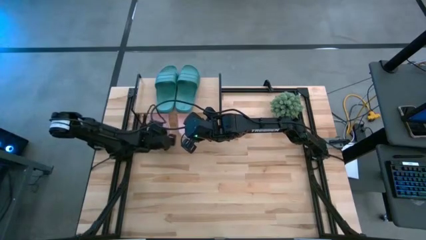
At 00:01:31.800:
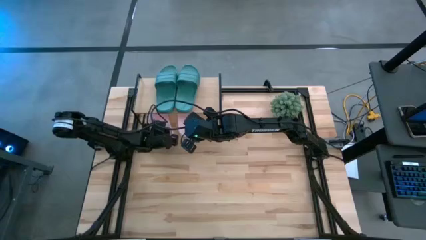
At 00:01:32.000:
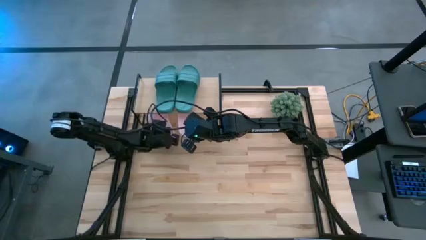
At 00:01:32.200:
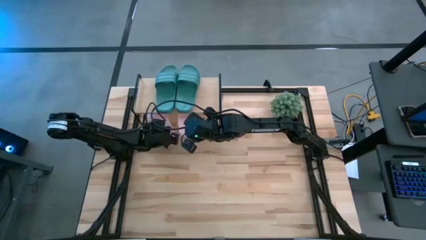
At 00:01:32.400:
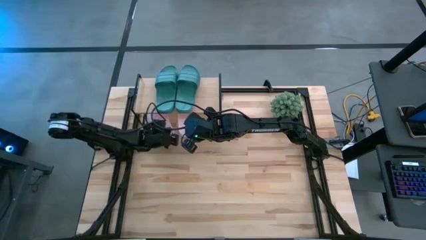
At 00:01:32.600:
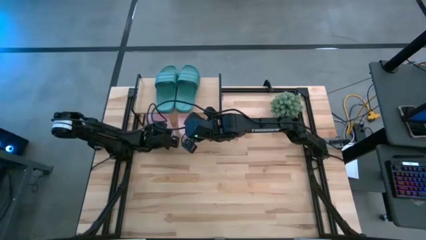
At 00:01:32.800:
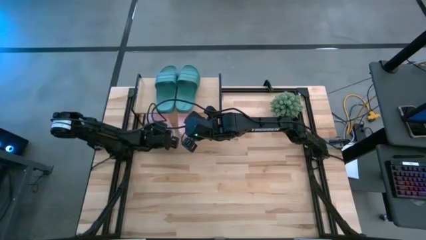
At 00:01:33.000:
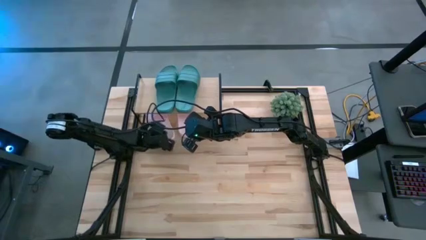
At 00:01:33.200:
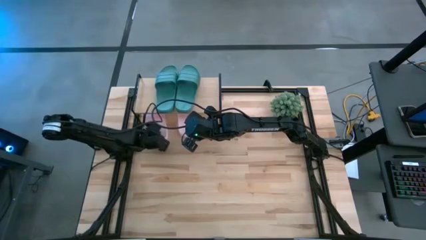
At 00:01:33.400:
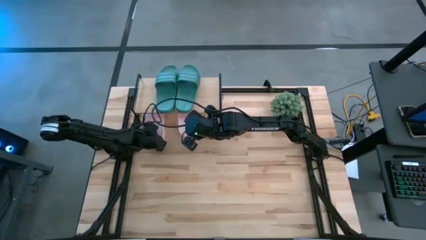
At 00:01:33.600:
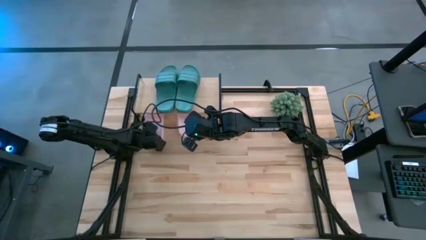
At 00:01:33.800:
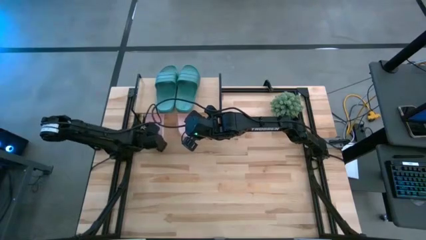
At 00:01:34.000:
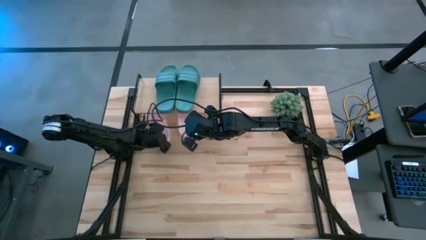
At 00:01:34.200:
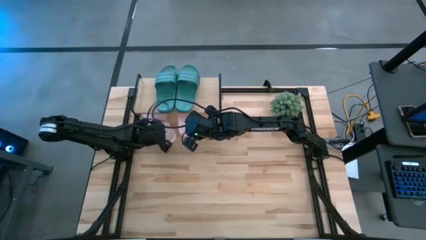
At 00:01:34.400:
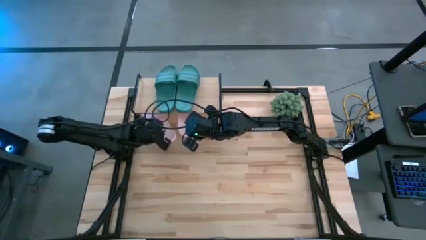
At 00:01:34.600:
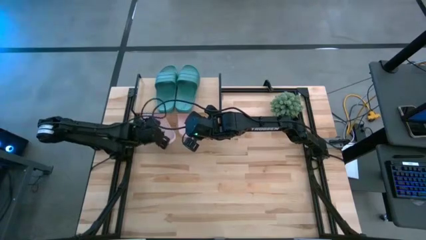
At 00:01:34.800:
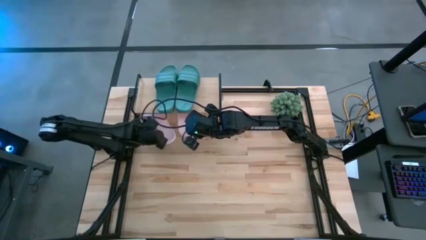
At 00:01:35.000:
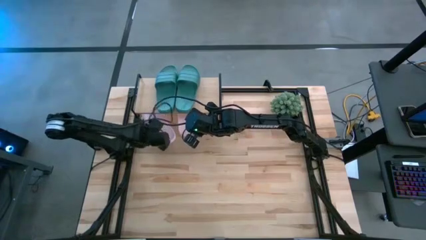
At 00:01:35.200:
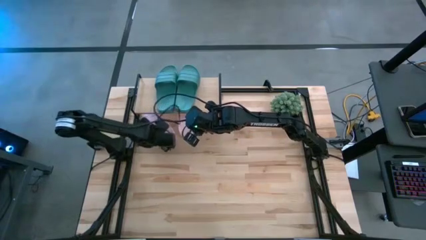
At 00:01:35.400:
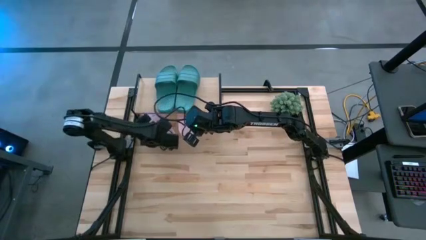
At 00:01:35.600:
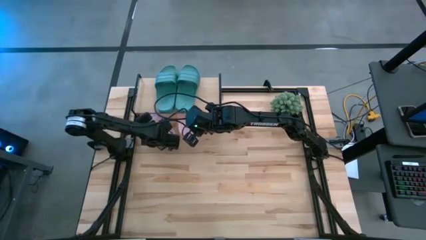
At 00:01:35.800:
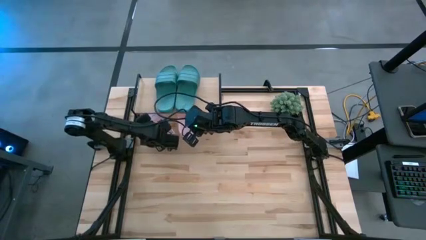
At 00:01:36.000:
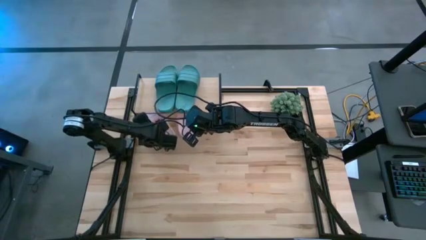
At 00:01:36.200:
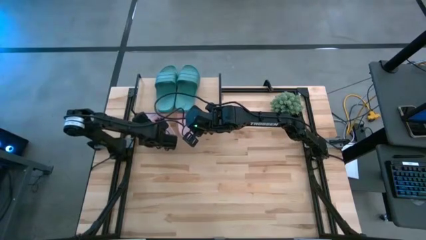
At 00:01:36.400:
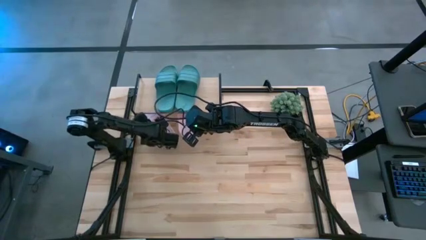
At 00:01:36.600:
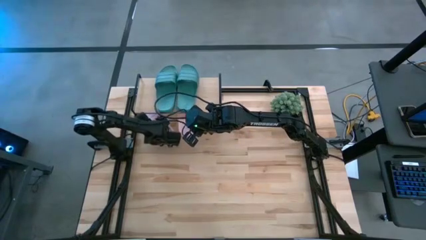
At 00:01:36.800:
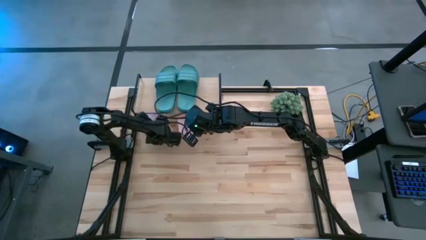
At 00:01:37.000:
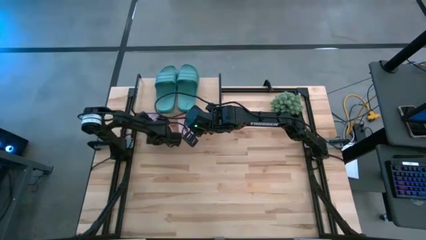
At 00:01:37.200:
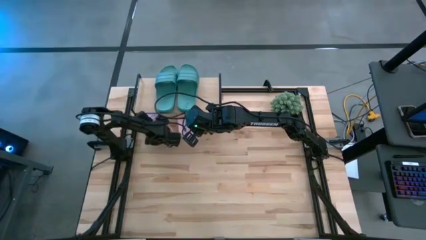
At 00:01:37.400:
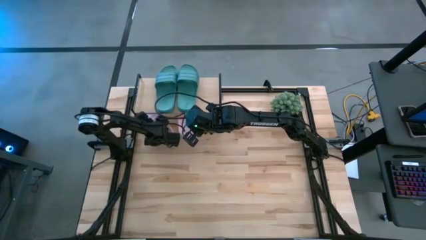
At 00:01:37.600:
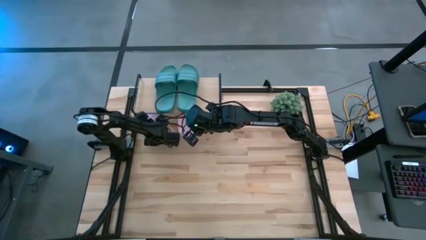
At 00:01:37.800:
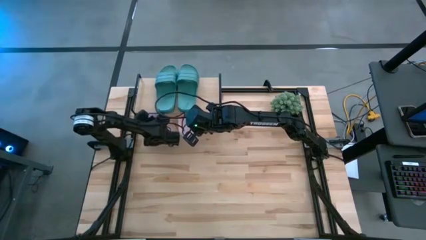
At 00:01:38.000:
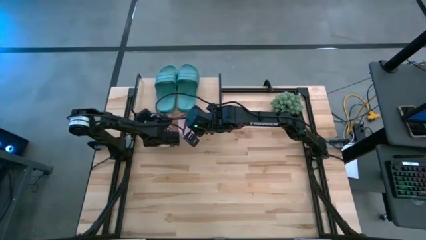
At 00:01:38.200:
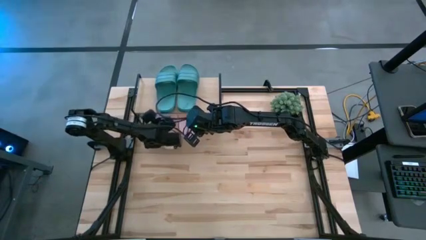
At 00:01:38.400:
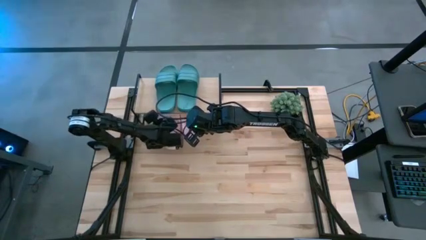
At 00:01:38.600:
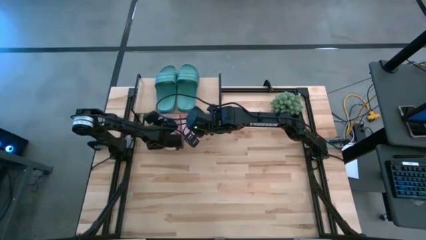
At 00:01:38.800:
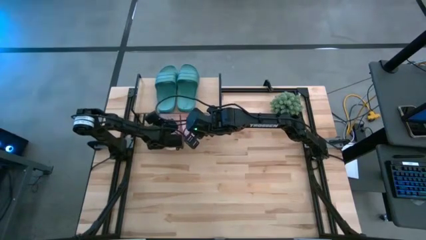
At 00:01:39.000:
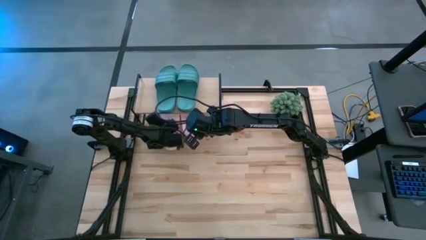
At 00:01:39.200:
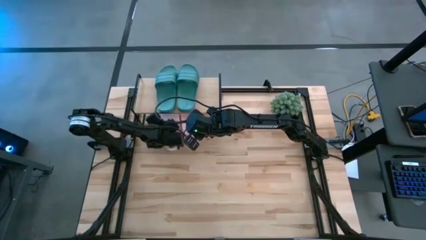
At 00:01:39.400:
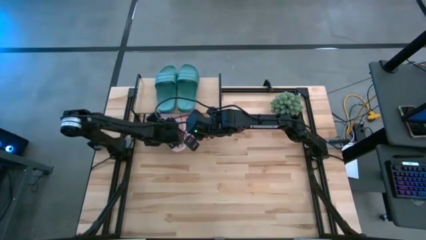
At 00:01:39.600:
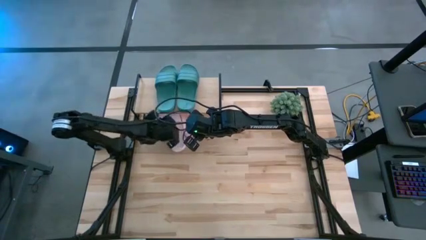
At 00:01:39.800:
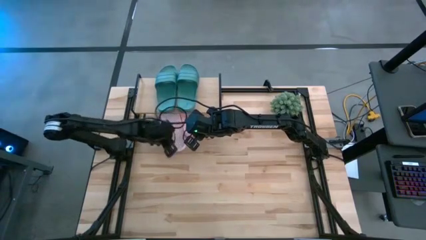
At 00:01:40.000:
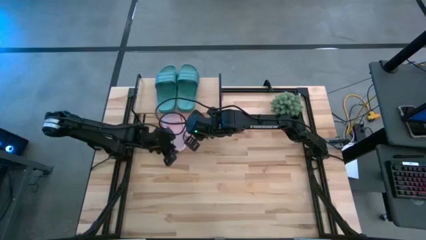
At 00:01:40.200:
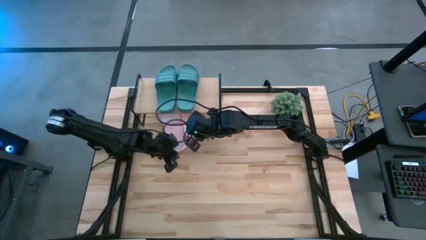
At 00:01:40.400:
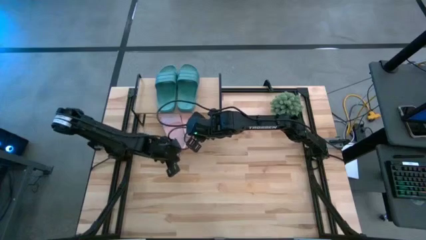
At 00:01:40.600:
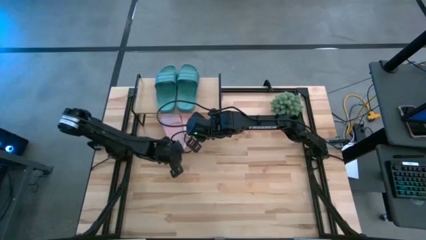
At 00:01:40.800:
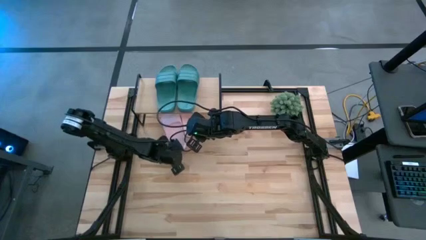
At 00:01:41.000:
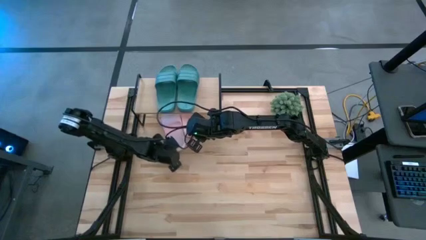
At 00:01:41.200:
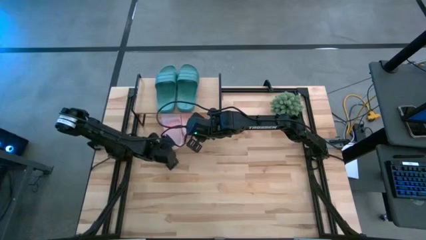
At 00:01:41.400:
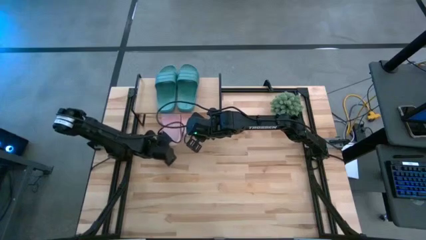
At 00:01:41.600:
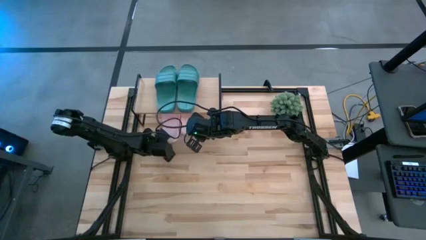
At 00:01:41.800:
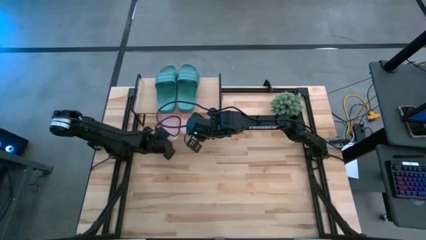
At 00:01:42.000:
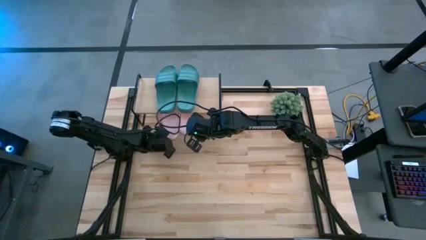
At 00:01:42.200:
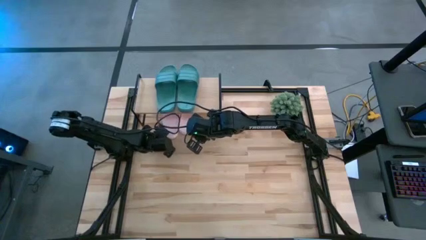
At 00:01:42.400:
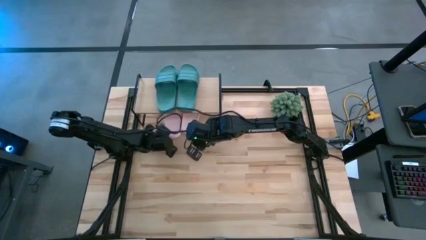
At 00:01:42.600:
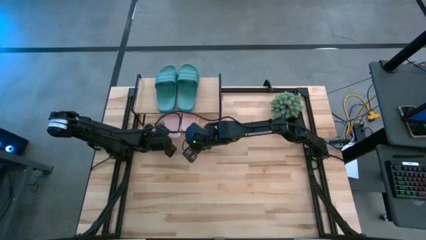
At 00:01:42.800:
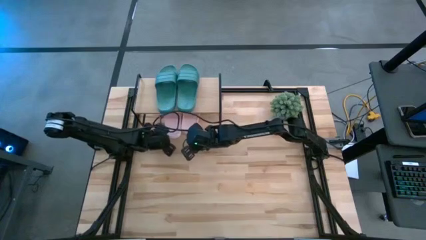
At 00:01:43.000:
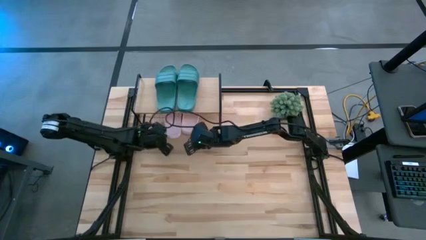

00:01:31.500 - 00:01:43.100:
Task: Pick and place slides into the shelf
Adjust the left pink slide under the shelf

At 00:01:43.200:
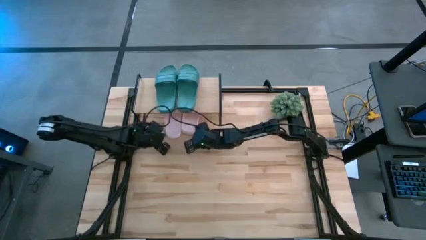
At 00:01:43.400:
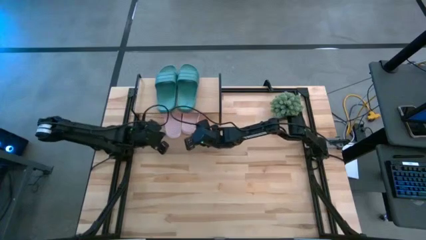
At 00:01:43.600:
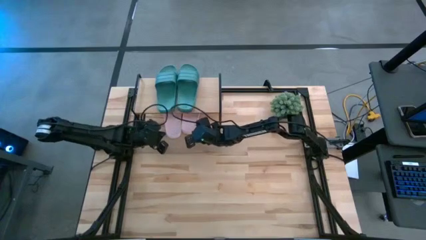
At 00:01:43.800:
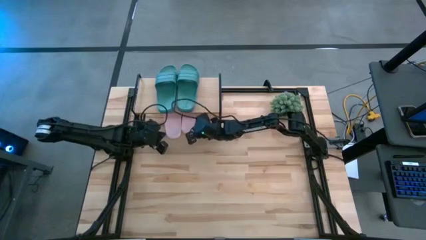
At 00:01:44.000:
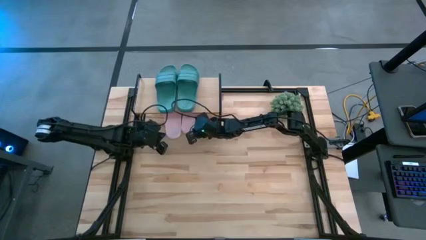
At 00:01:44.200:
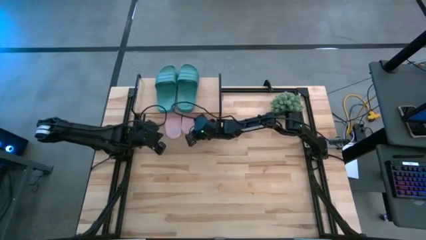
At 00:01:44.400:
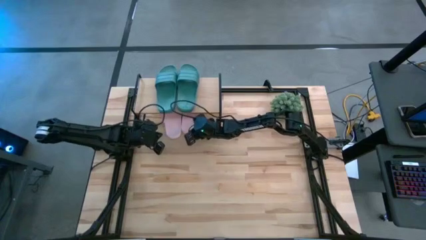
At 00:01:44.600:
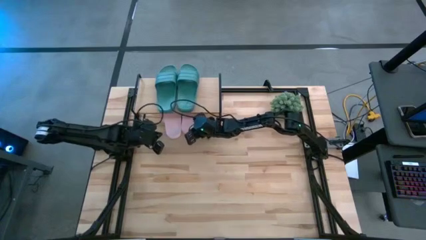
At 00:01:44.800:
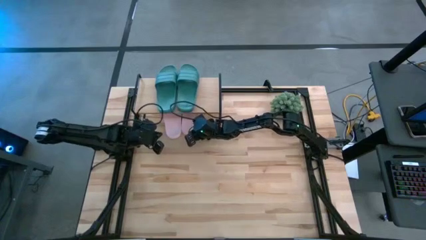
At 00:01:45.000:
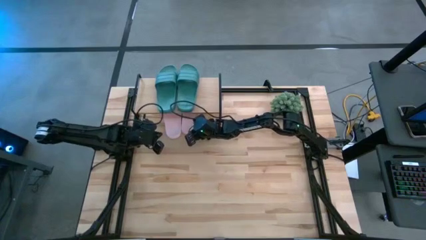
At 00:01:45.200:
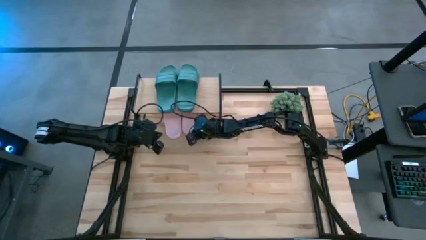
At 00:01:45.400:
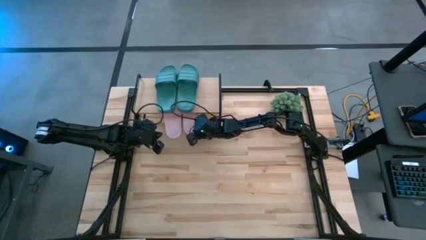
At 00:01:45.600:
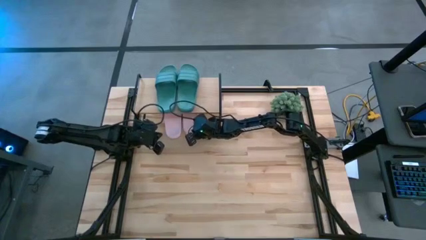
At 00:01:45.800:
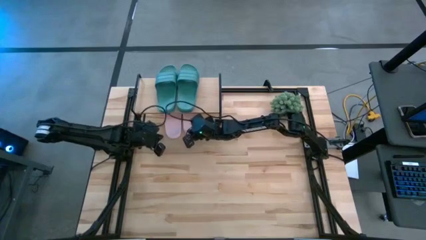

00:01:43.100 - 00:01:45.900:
Adjust the right pink slide under the shelf

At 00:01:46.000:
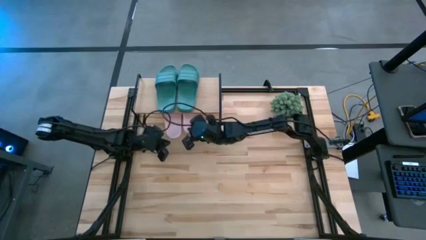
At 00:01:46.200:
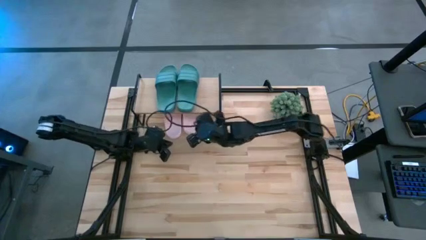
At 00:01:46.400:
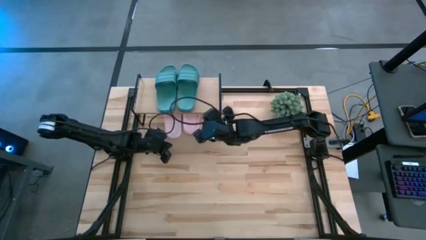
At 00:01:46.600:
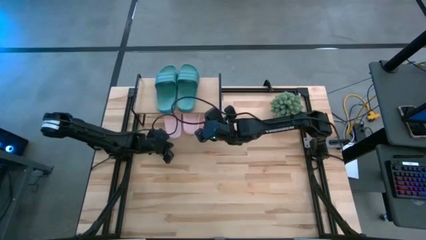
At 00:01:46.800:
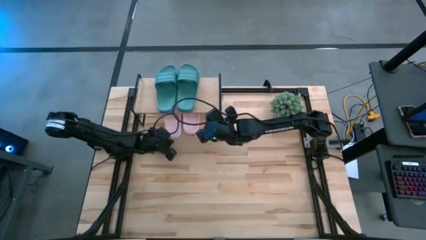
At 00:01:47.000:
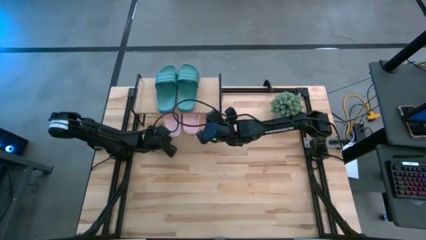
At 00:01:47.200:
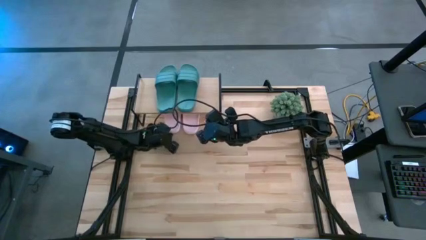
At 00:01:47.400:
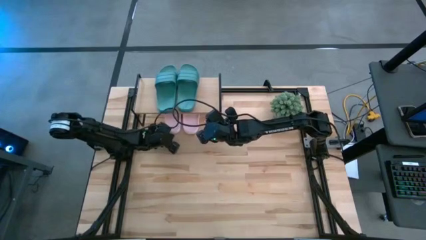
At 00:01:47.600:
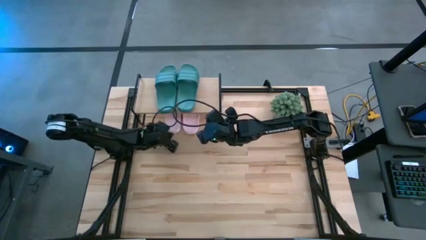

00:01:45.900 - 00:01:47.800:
Adjust the left pink slide under the shelf
